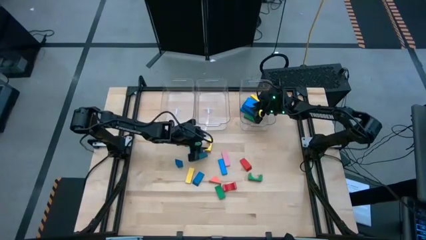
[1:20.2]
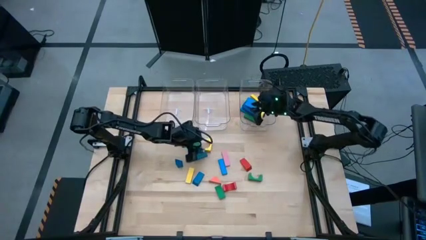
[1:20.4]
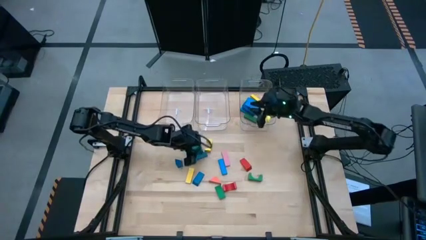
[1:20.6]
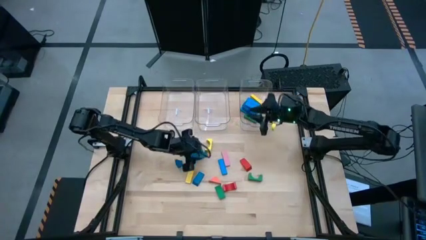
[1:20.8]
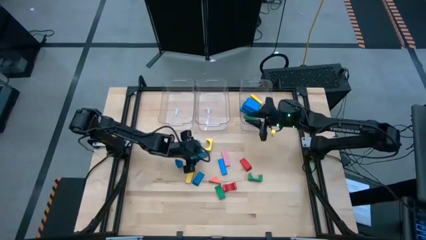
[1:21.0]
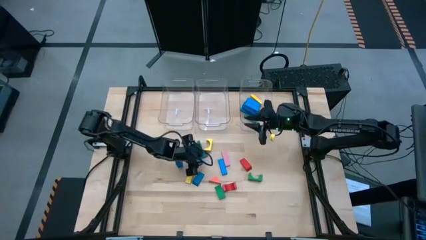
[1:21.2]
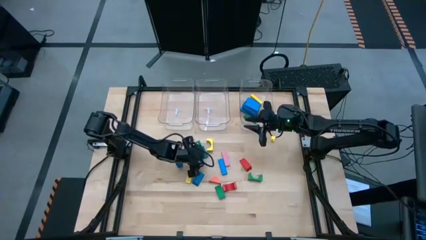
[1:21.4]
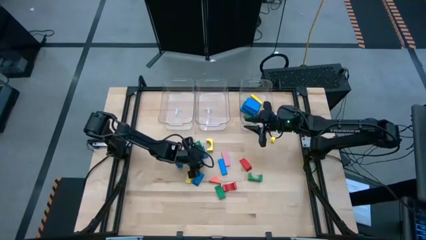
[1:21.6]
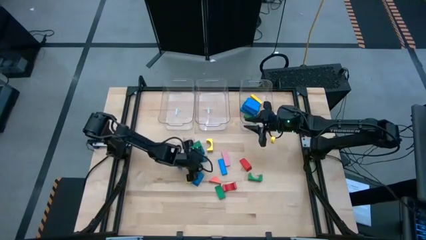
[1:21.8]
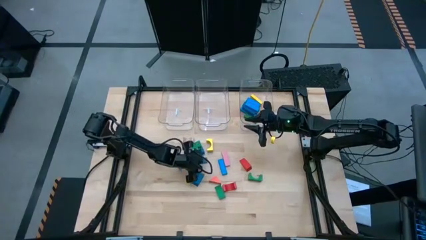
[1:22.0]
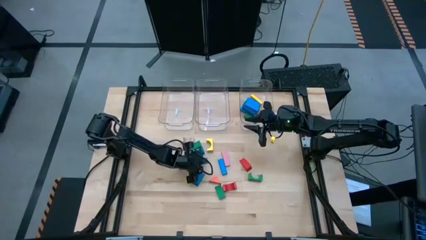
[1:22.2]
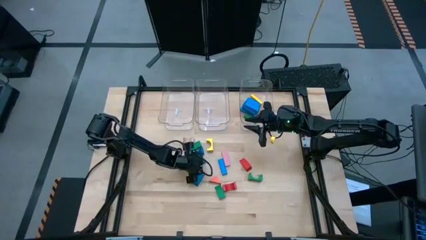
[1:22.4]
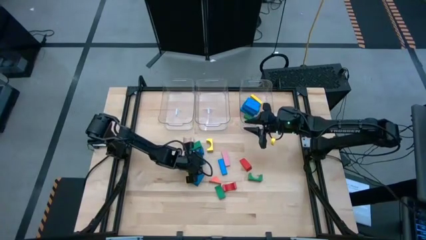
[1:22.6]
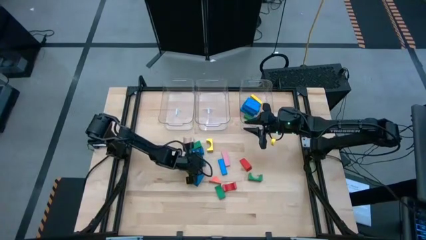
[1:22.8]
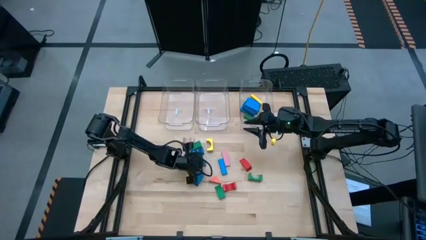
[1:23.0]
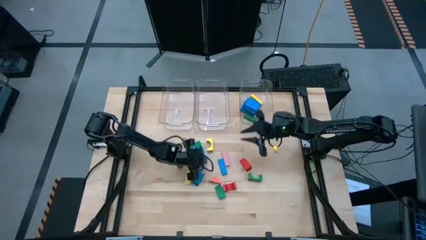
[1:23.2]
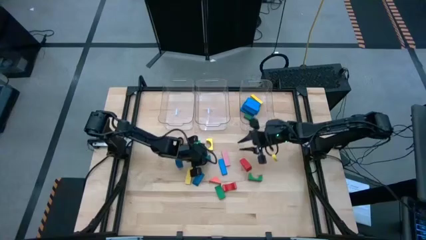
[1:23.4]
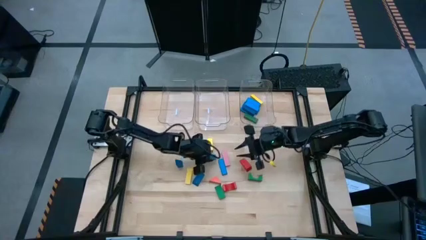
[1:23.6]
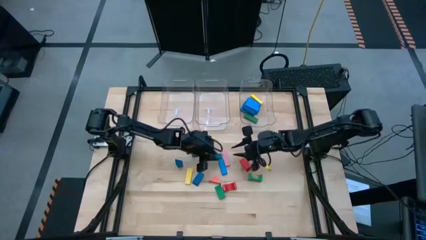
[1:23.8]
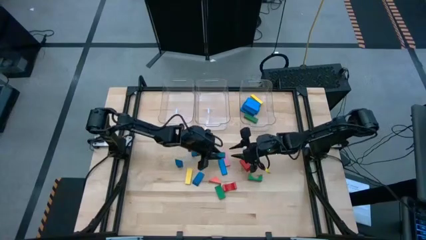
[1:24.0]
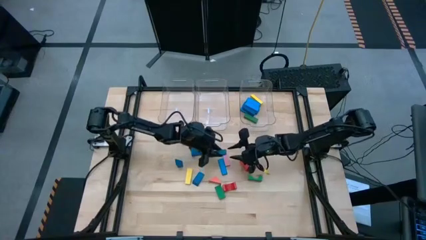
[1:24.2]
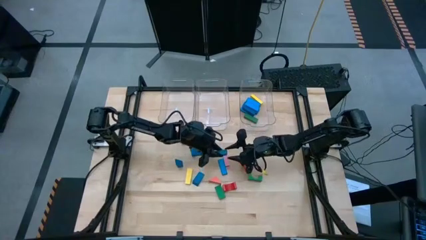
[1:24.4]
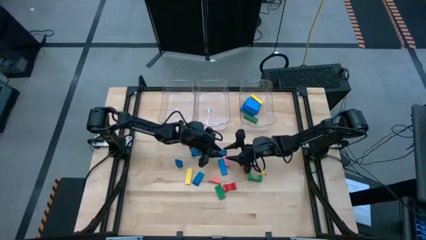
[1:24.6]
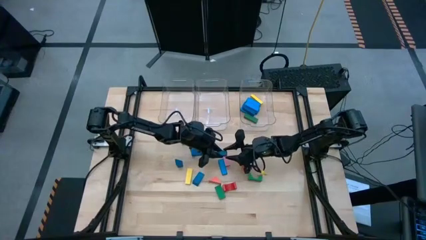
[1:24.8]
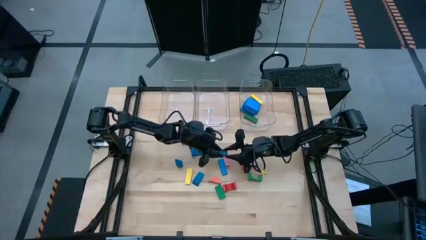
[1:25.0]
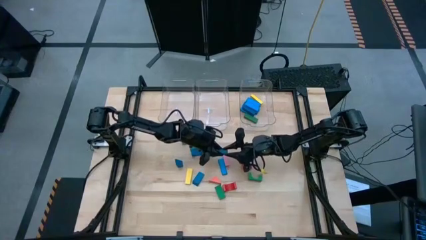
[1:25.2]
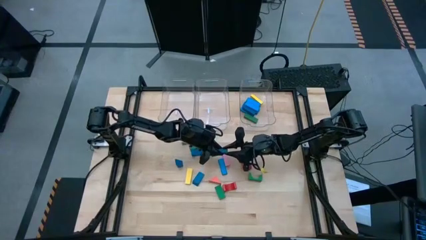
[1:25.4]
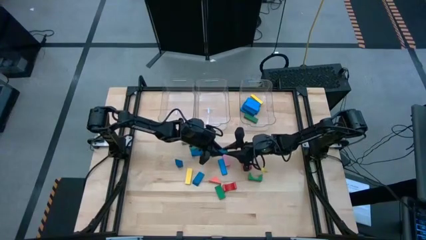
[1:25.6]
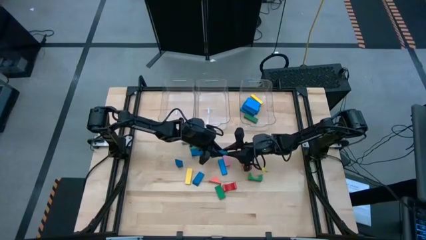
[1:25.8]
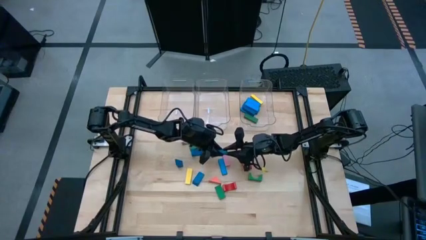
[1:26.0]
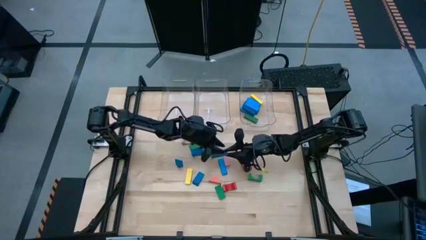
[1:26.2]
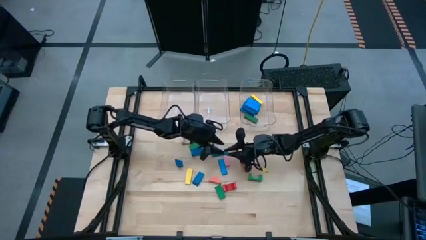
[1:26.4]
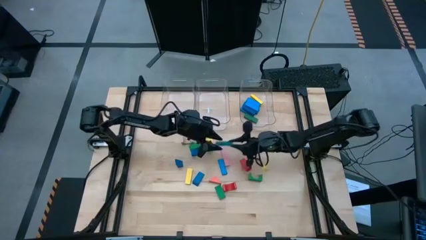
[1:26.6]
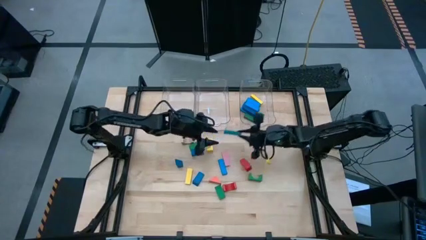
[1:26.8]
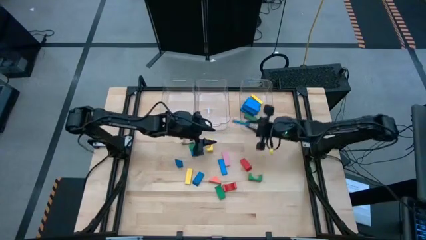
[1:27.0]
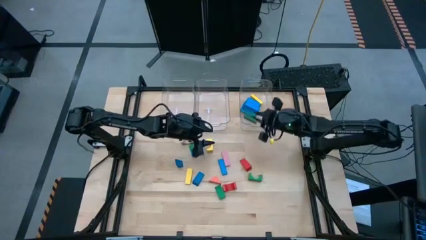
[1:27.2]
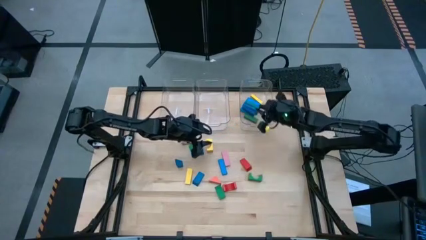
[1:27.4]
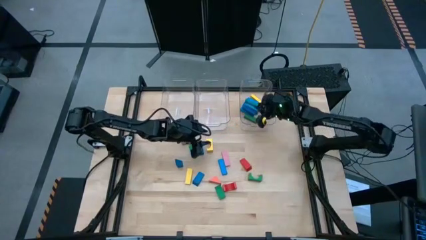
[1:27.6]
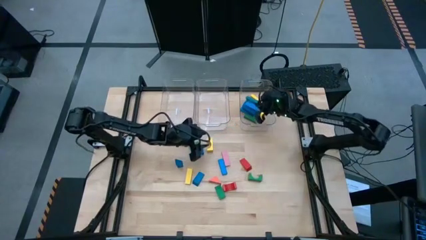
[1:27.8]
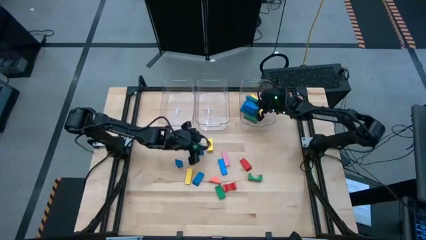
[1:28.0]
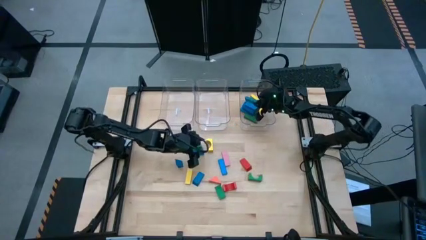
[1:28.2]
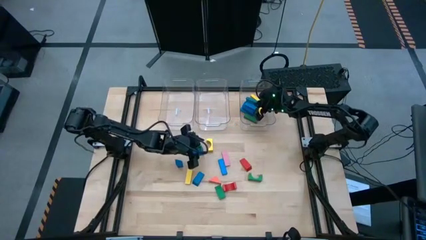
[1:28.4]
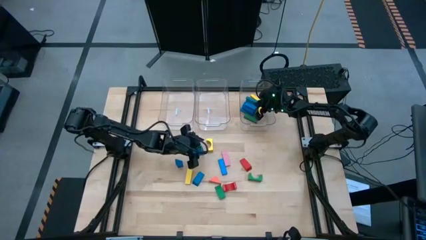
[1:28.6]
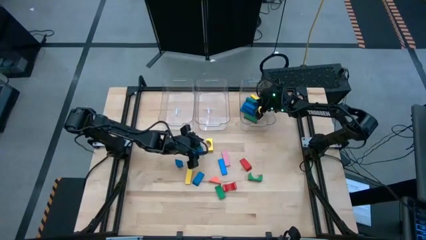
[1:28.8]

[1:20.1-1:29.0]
Task: Sort blocks by size
Put the dark blue rectangular block into the right transparent bin
